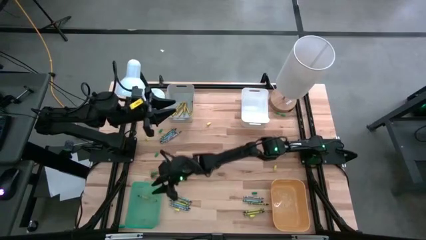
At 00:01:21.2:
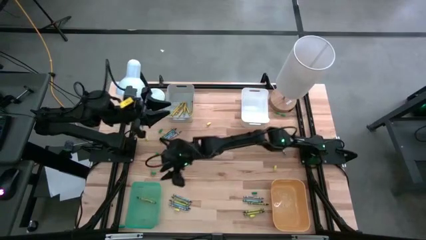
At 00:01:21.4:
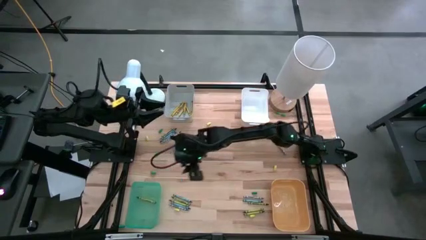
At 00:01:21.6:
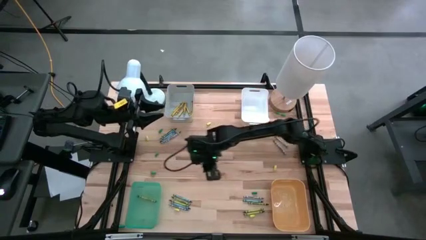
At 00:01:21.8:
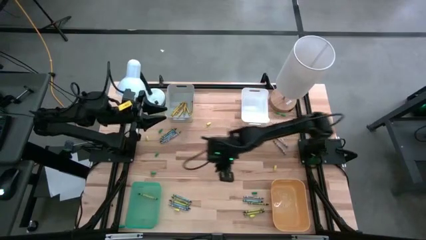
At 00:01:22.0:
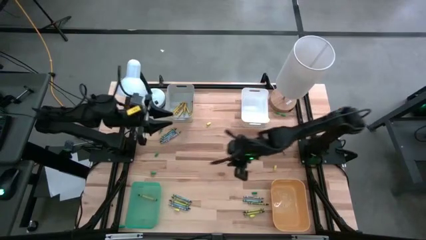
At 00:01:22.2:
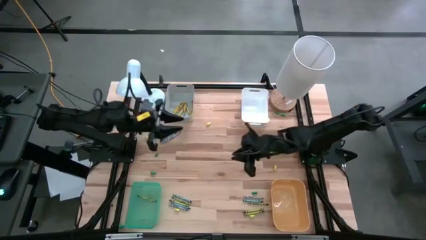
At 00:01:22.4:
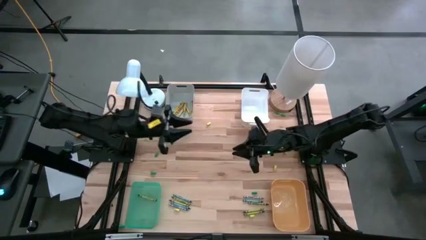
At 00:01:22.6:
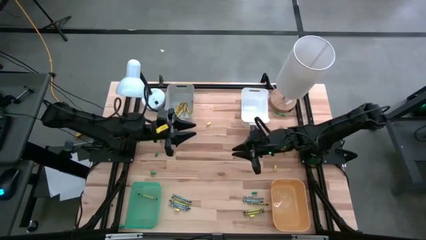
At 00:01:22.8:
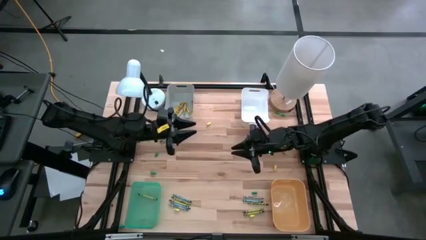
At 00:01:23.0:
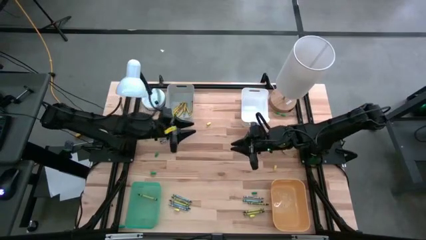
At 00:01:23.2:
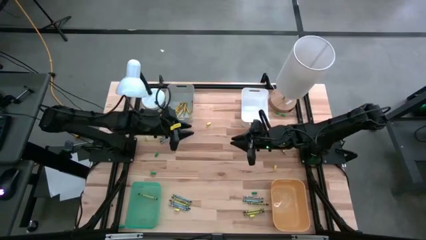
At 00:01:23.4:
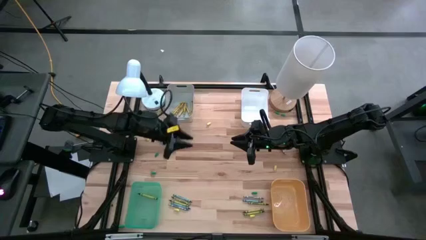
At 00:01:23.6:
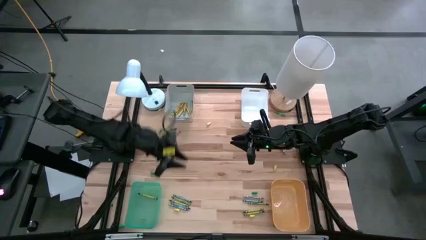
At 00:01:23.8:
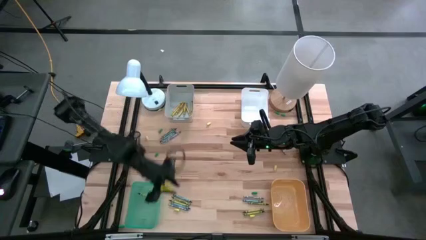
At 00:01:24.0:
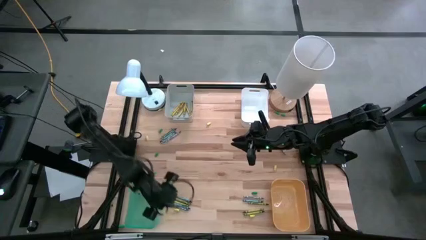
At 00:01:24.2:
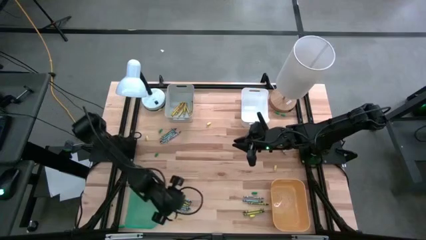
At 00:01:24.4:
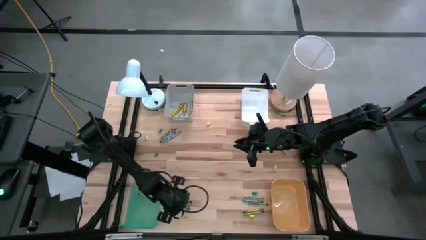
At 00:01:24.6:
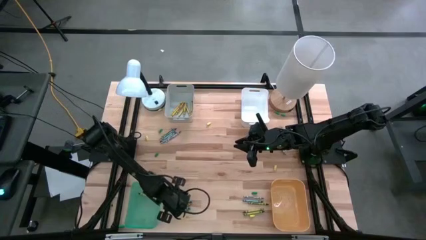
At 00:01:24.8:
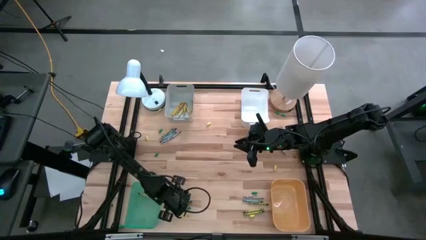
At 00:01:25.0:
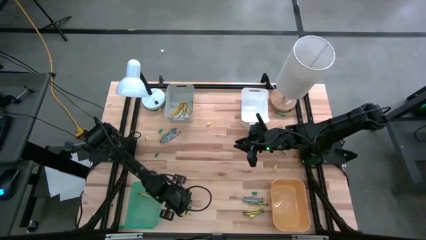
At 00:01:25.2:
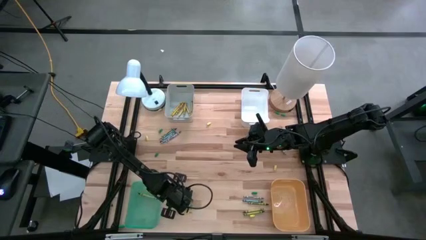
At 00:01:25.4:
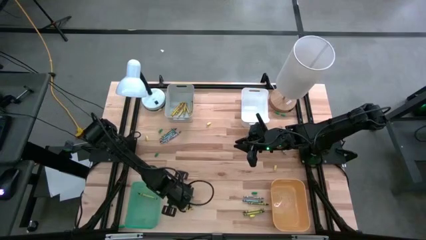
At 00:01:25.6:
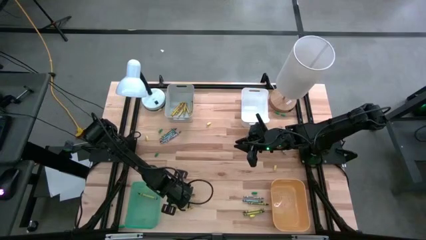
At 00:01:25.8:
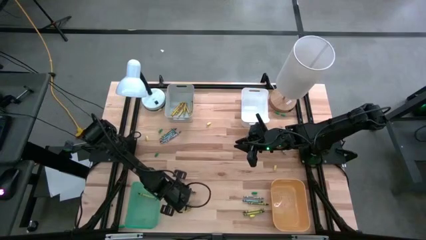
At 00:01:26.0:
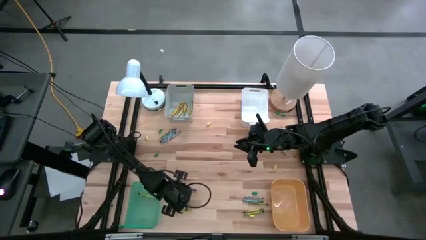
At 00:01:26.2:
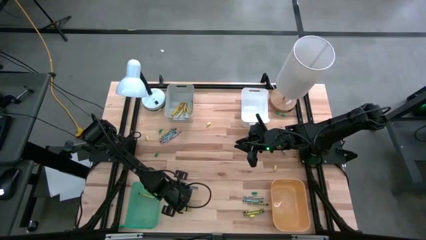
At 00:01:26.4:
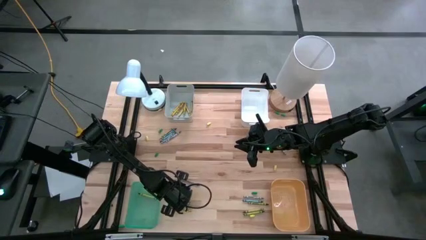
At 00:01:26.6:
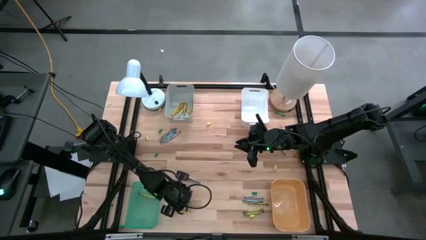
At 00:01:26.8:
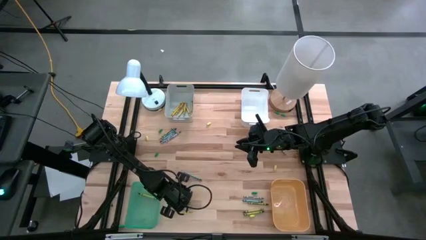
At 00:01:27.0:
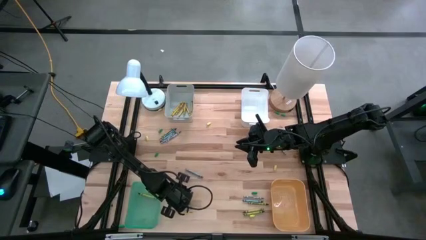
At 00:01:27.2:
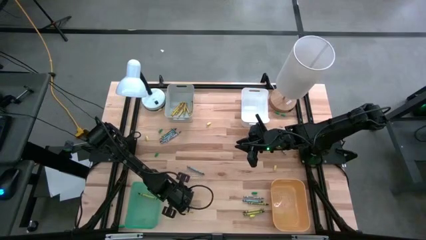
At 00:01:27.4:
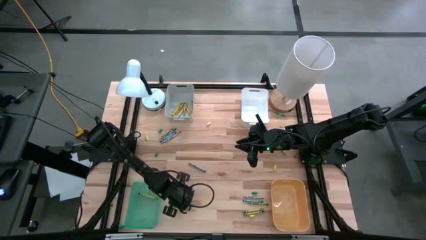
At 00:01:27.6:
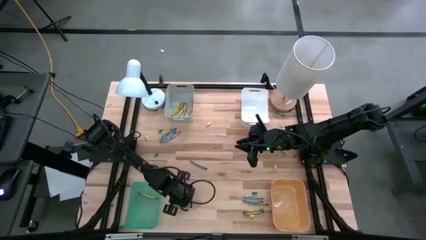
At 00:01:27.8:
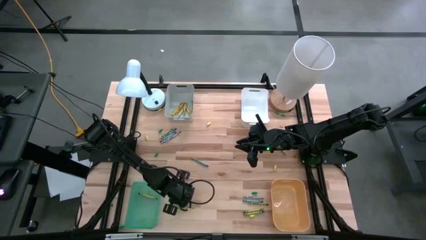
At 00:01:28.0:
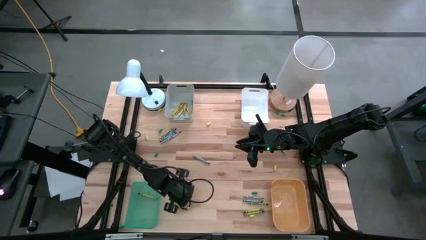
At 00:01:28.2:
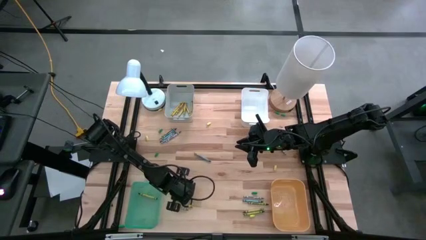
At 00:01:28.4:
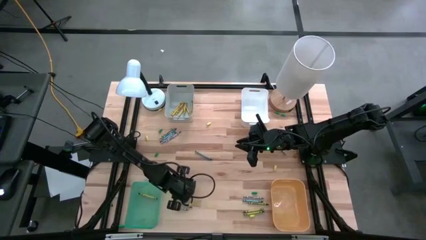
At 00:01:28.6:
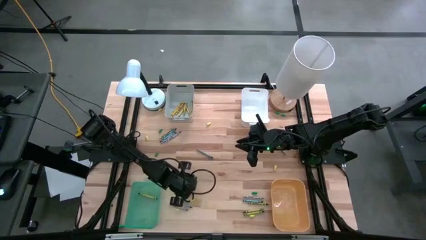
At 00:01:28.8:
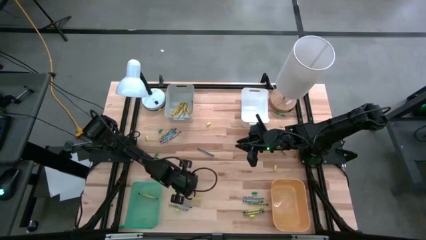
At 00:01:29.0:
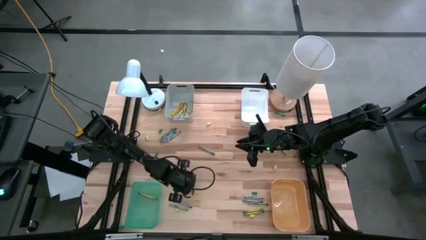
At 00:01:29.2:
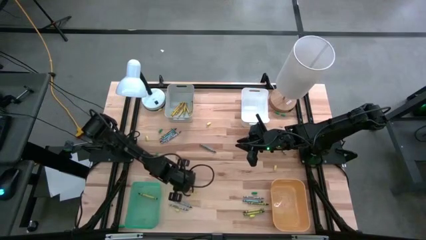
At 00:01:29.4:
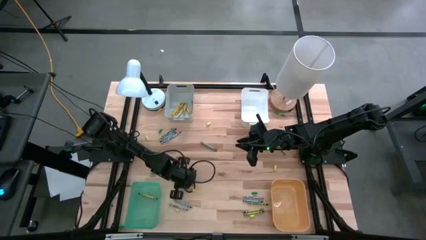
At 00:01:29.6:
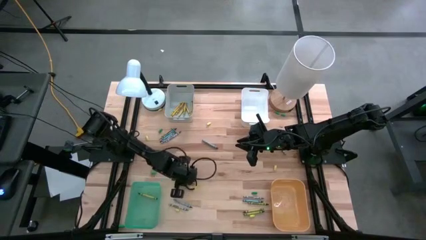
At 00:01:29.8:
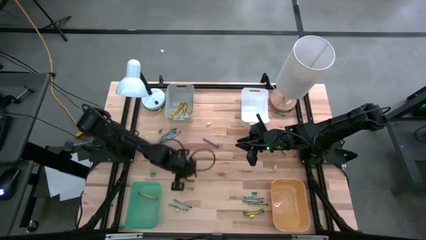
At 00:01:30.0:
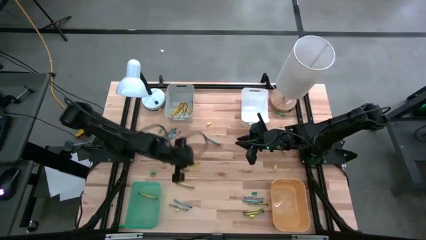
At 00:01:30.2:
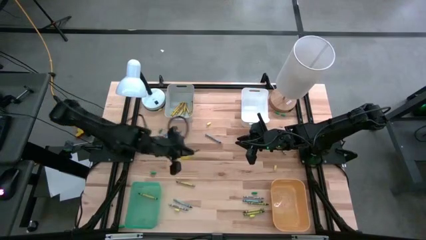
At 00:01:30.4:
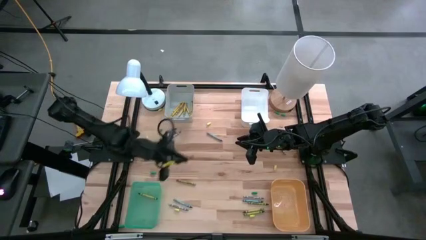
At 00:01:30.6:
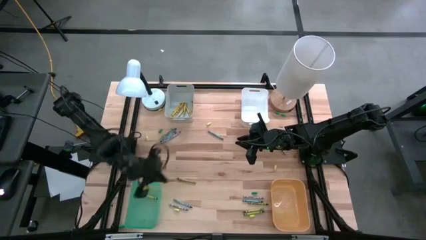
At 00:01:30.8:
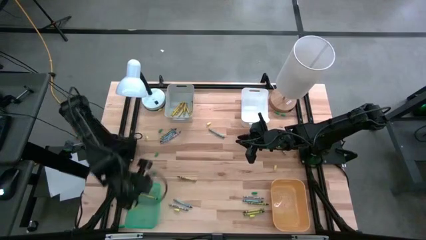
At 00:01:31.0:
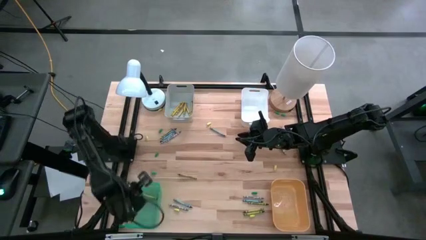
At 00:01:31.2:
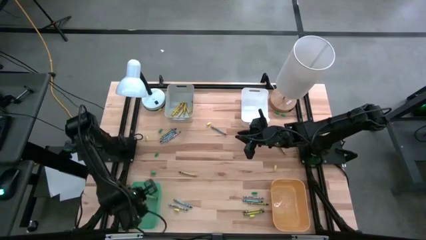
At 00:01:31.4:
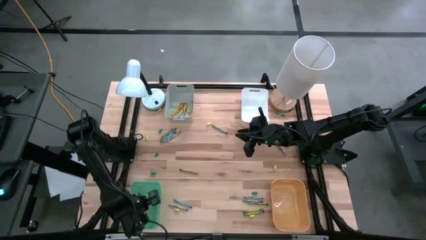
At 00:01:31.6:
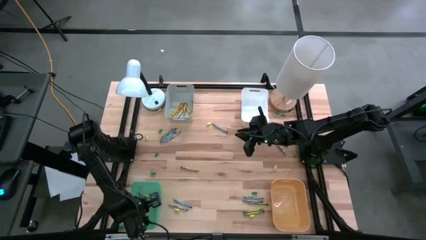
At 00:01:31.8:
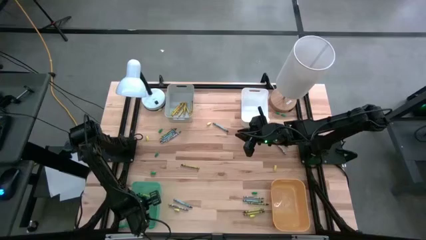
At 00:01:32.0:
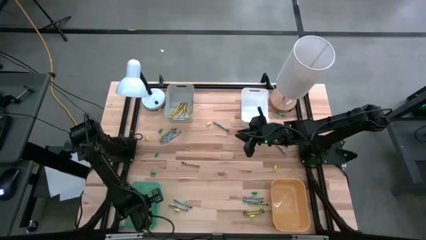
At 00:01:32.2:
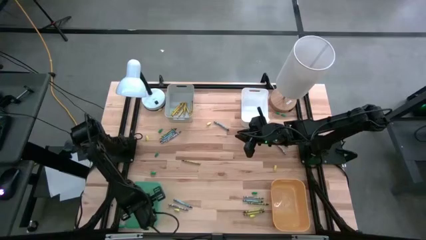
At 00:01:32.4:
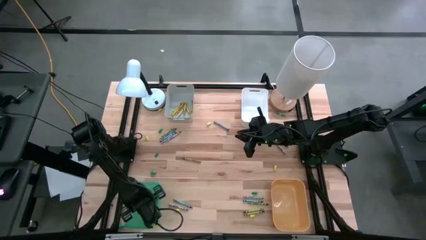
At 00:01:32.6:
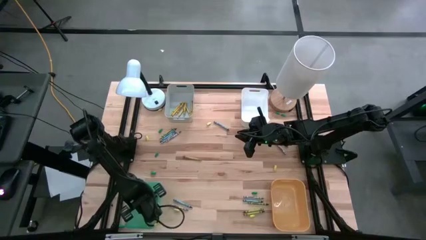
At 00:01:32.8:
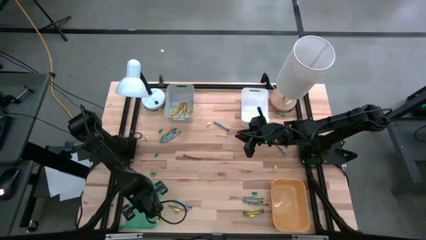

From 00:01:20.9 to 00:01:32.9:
Task: Sort crayons
Put the green crayon into the green bin

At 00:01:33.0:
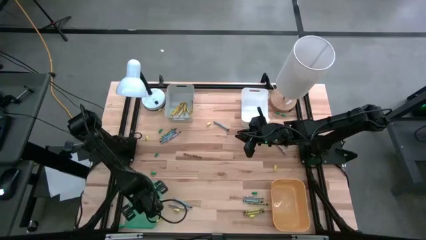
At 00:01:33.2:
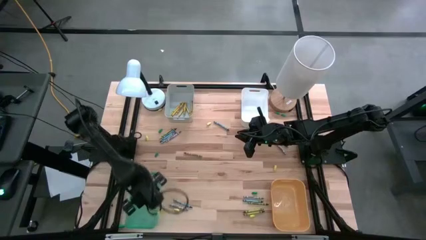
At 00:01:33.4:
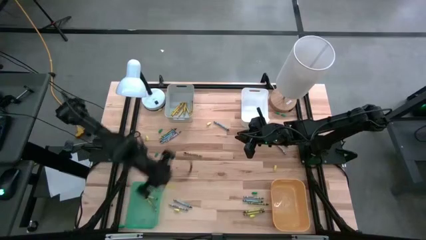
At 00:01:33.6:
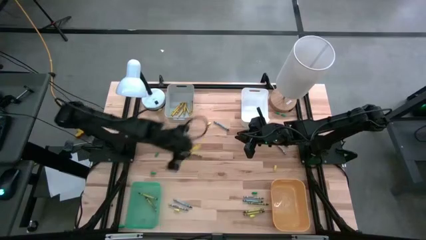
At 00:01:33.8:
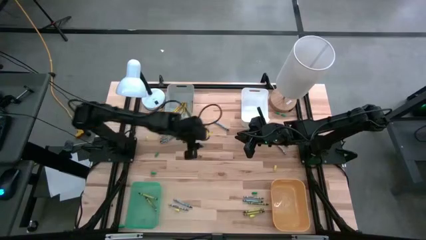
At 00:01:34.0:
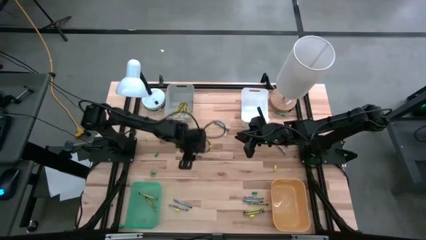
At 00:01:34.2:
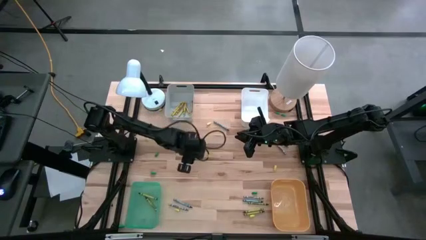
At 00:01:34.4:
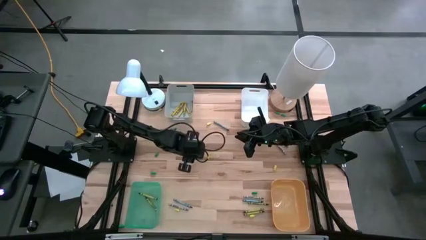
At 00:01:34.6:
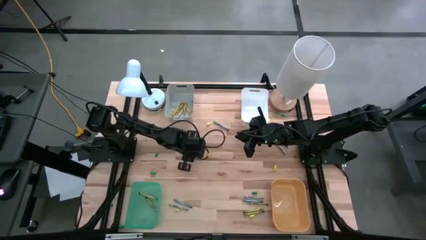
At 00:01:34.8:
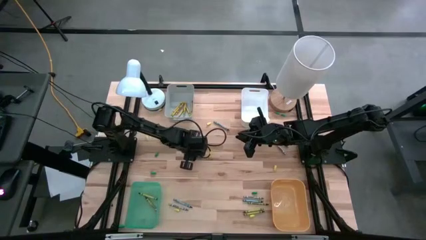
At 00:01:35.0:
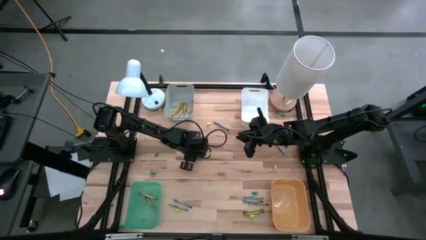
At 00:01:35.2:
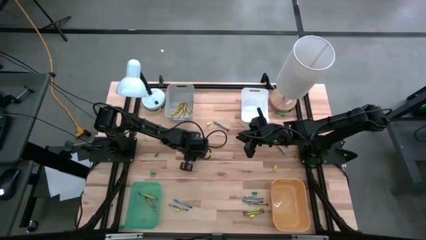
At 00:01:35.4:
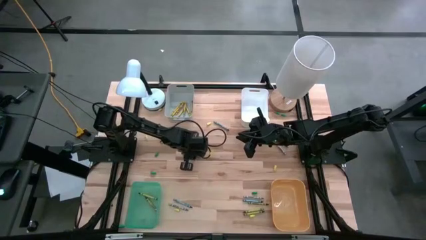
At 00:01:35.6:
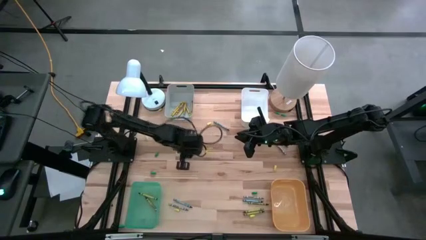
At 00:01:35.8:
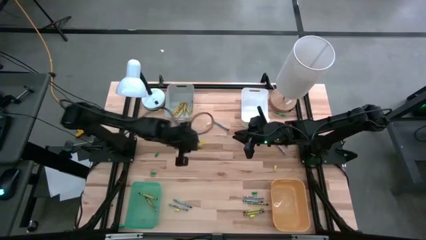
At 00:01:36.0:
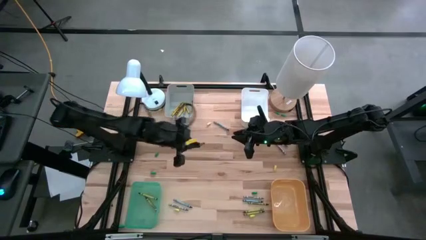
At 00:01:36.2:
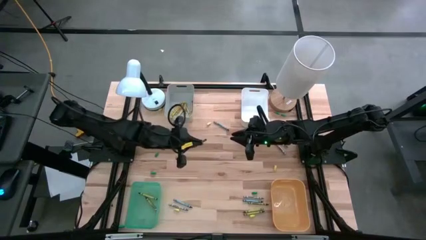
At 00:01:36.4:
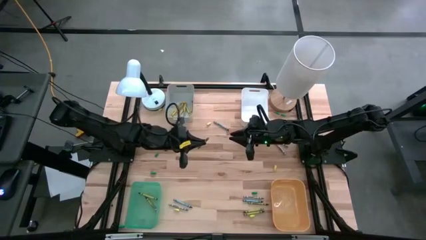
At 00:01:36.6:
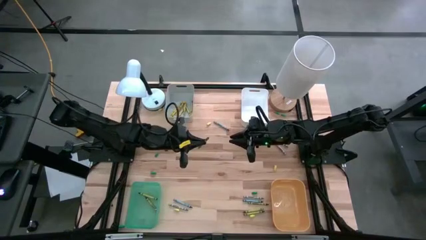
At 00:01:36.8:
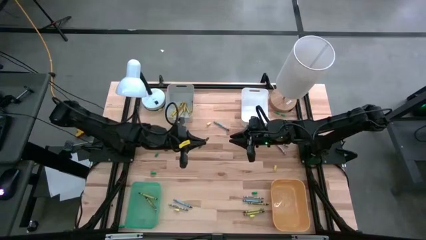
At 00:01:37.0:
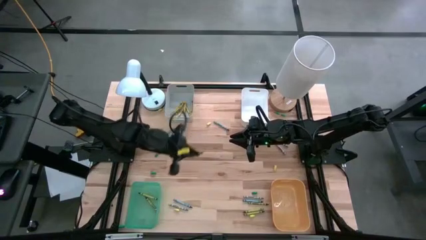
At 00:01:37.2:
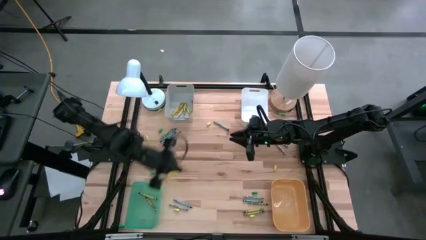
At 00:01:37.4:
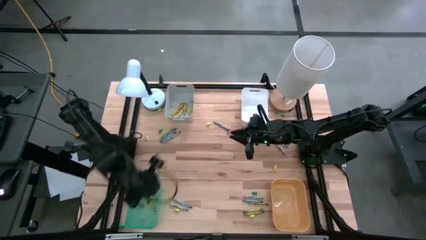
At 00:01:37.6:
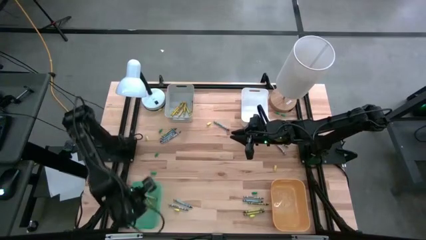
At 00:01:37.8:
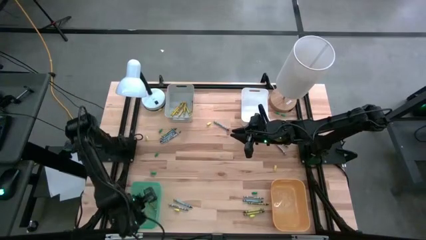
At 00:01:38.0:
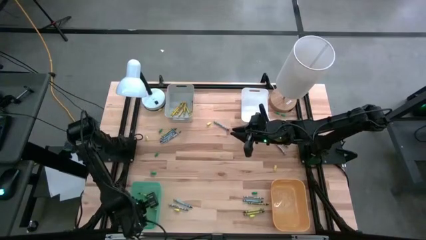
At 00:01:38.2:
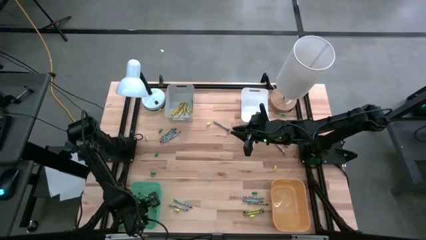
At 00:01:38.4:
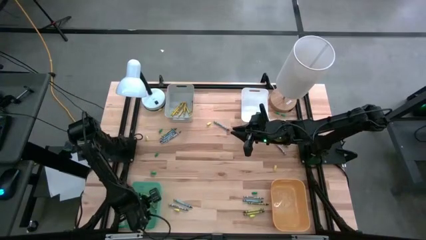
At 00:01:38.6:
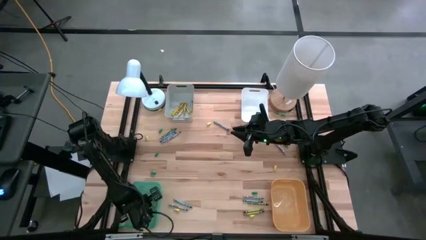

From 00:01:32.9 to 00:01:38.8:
Put the green crayon into the green bin
